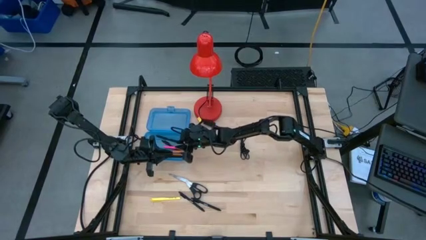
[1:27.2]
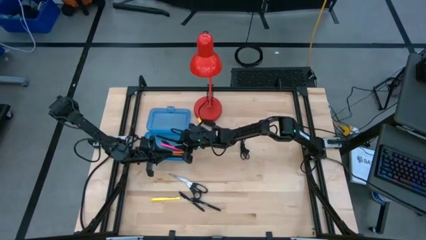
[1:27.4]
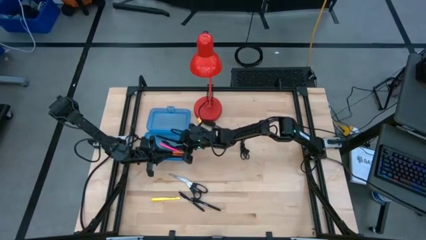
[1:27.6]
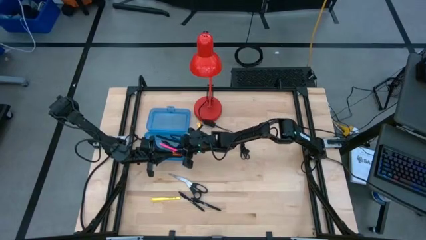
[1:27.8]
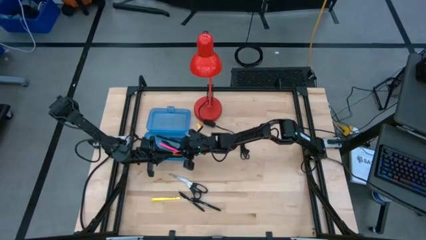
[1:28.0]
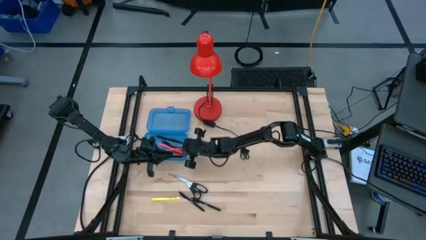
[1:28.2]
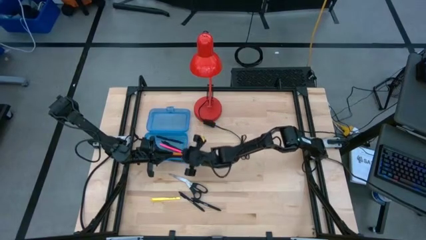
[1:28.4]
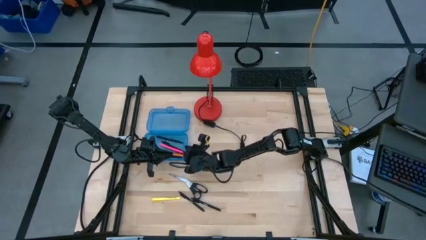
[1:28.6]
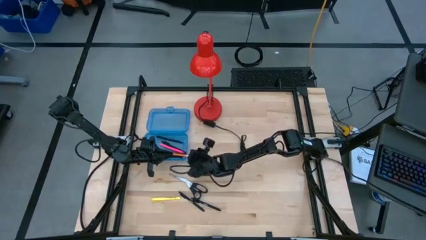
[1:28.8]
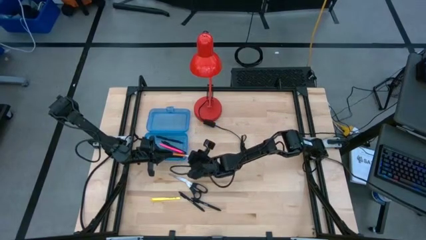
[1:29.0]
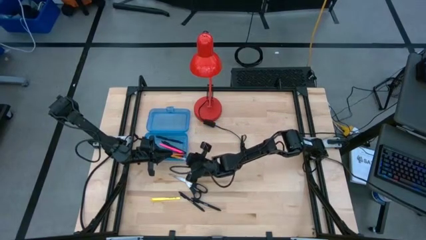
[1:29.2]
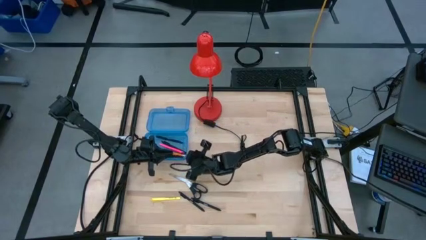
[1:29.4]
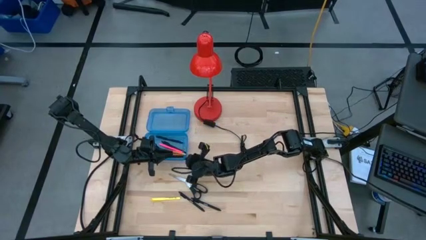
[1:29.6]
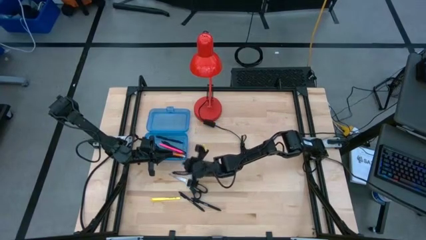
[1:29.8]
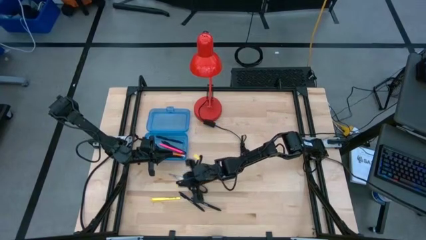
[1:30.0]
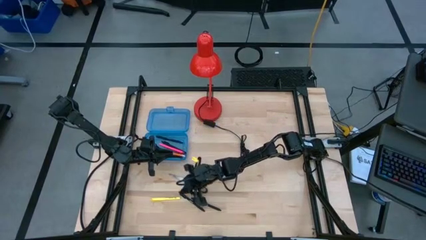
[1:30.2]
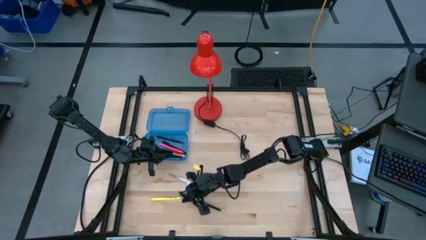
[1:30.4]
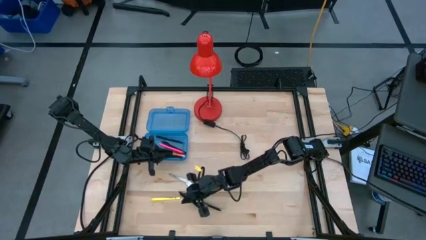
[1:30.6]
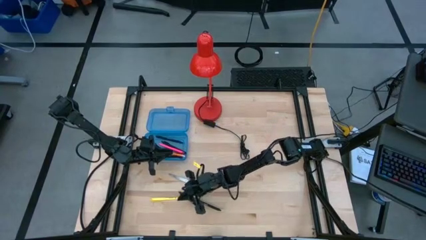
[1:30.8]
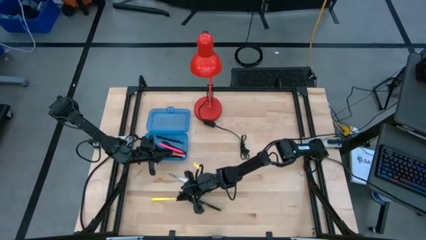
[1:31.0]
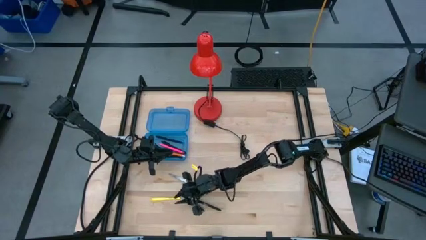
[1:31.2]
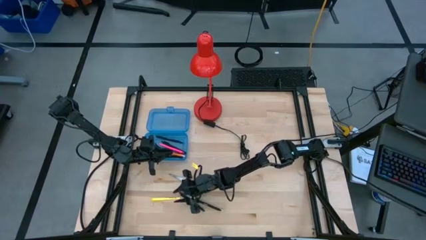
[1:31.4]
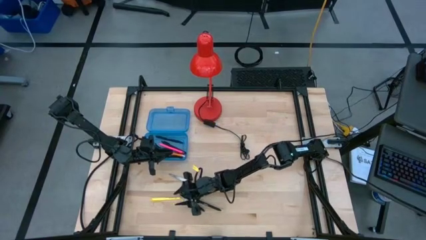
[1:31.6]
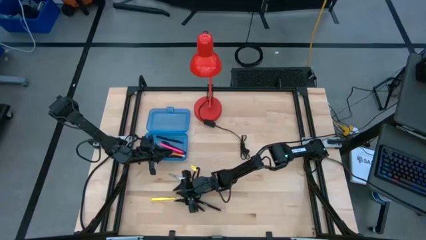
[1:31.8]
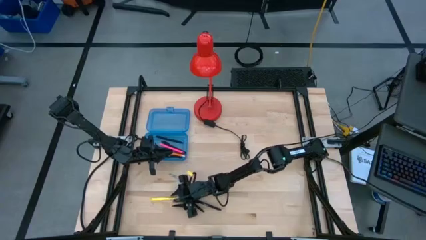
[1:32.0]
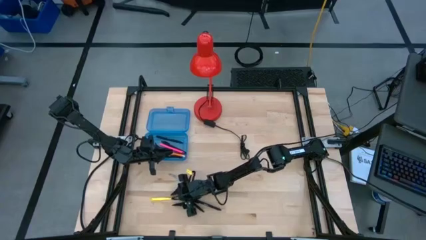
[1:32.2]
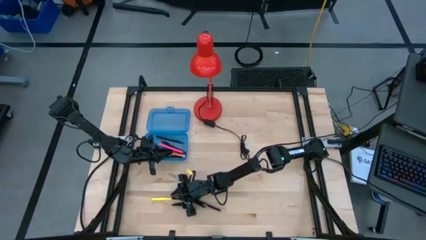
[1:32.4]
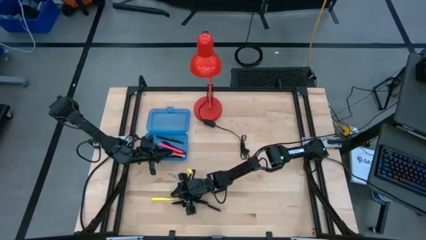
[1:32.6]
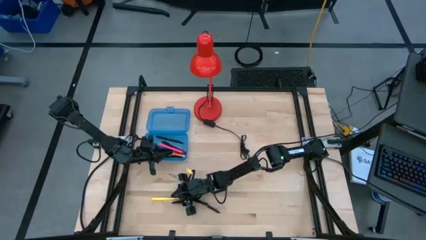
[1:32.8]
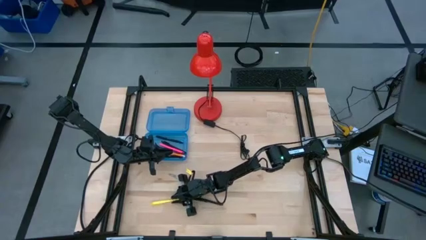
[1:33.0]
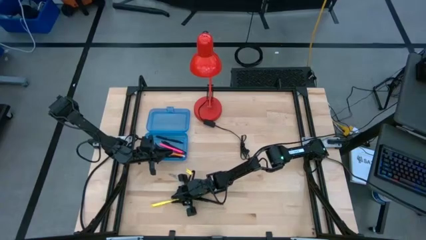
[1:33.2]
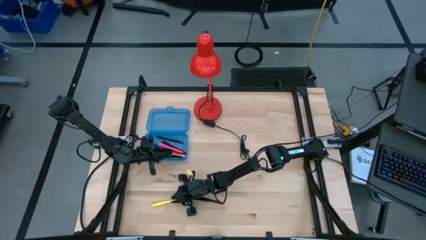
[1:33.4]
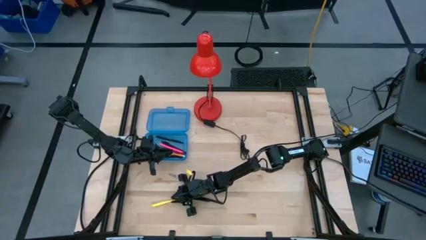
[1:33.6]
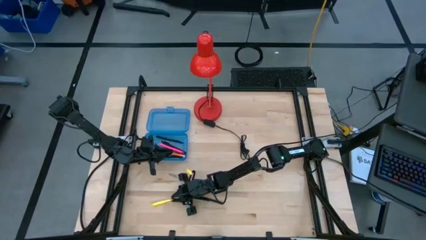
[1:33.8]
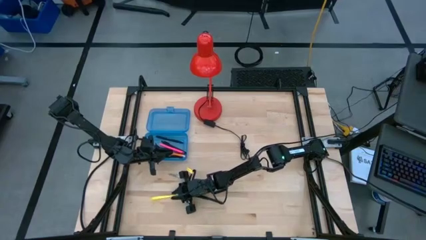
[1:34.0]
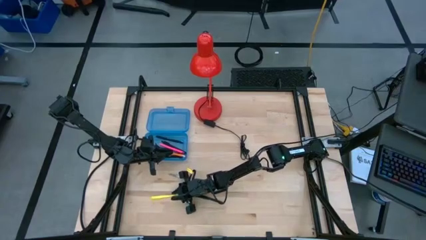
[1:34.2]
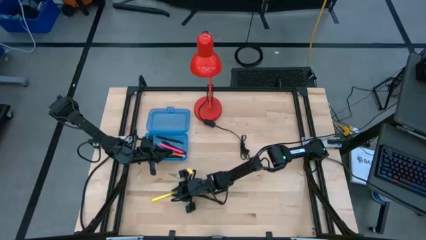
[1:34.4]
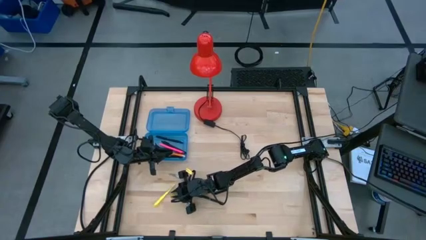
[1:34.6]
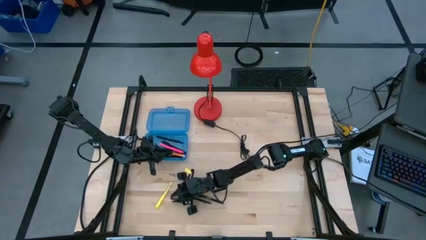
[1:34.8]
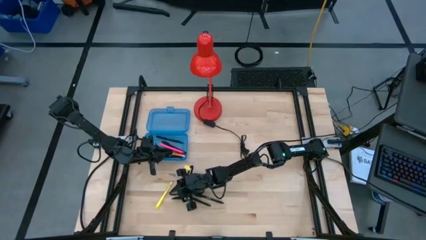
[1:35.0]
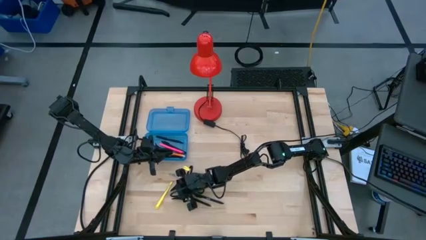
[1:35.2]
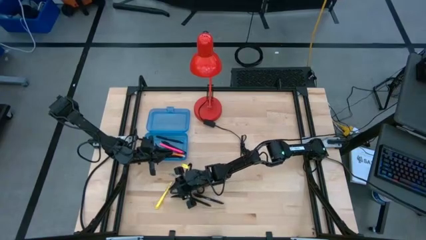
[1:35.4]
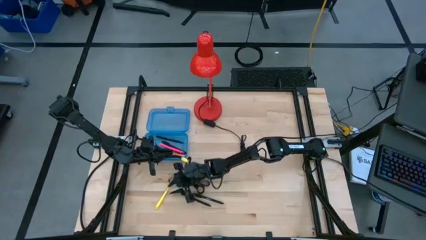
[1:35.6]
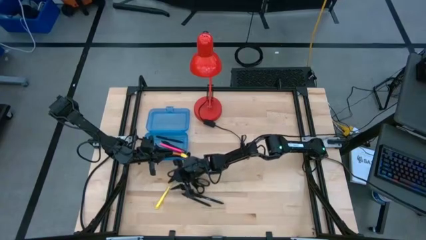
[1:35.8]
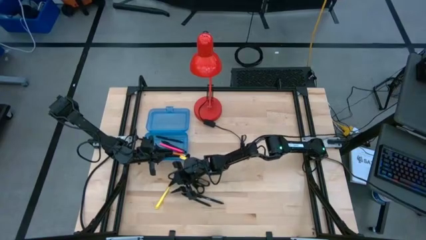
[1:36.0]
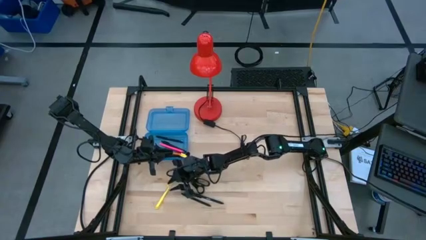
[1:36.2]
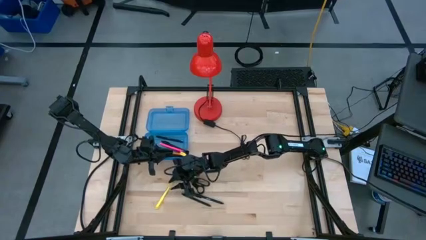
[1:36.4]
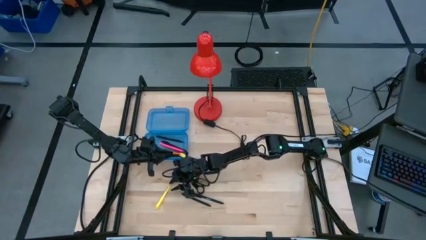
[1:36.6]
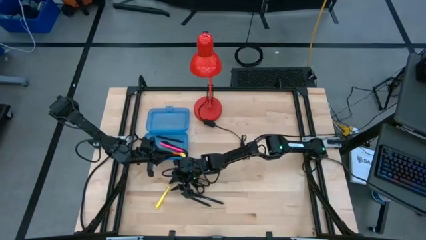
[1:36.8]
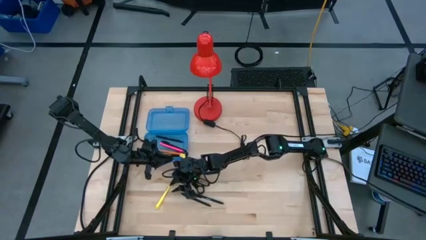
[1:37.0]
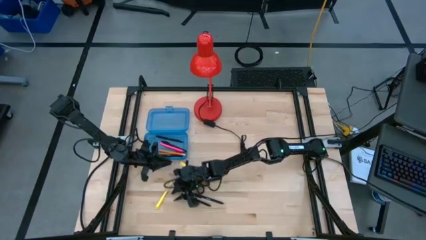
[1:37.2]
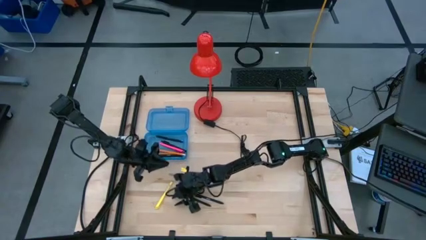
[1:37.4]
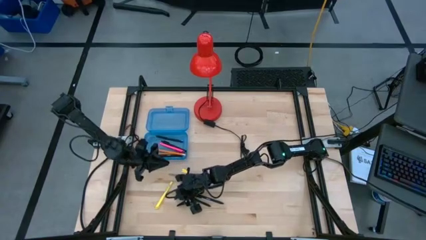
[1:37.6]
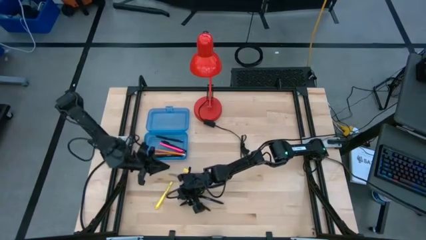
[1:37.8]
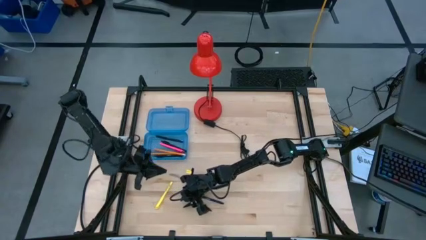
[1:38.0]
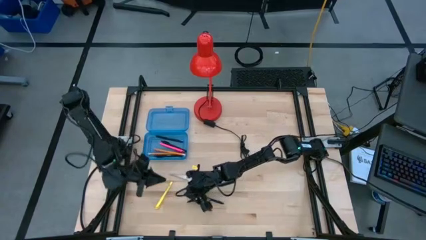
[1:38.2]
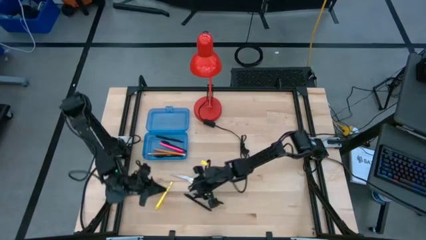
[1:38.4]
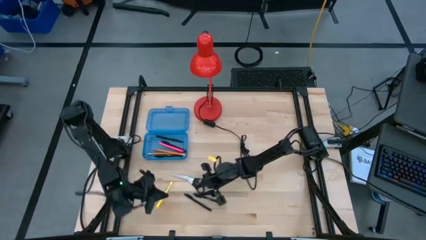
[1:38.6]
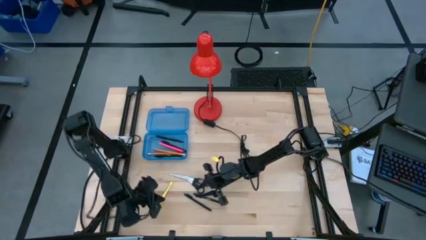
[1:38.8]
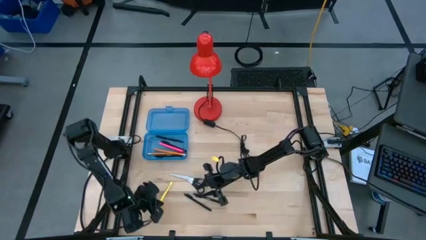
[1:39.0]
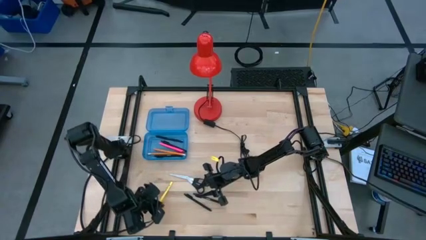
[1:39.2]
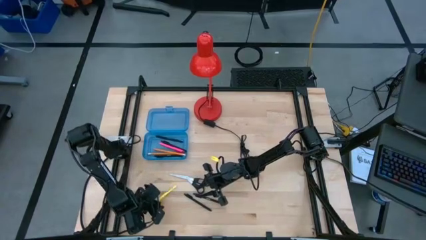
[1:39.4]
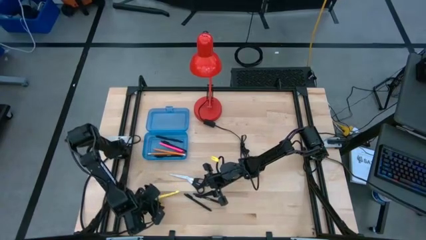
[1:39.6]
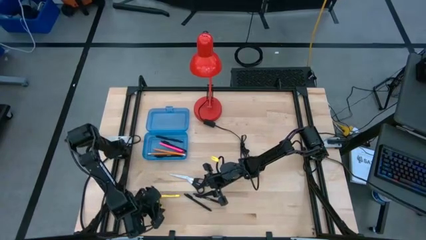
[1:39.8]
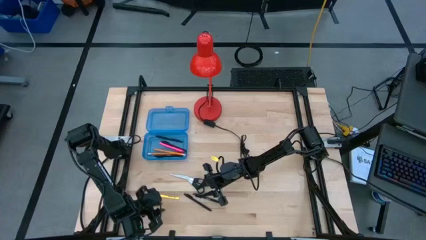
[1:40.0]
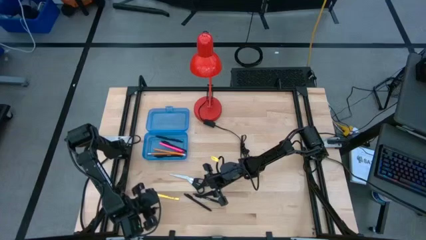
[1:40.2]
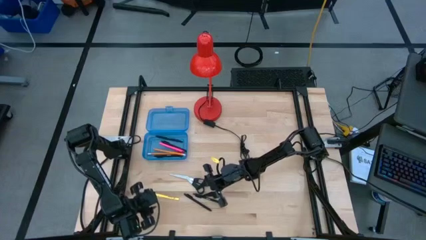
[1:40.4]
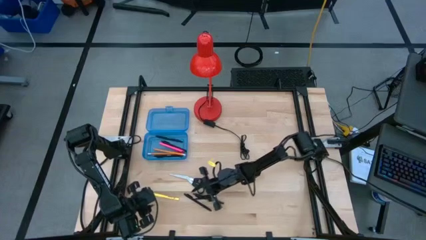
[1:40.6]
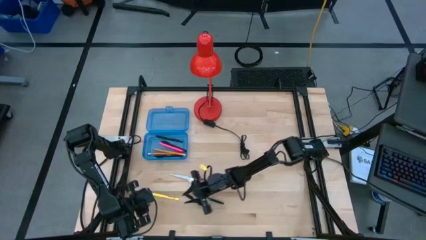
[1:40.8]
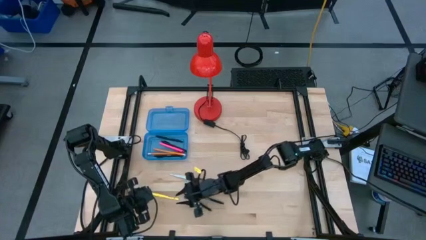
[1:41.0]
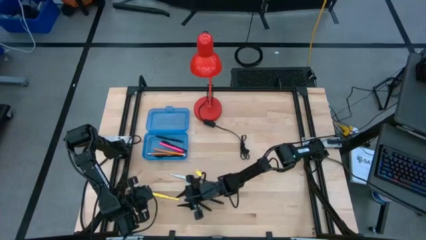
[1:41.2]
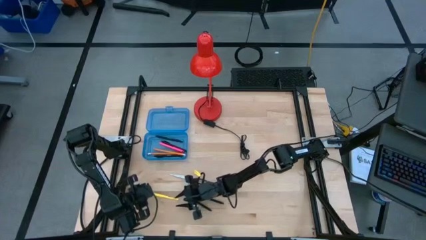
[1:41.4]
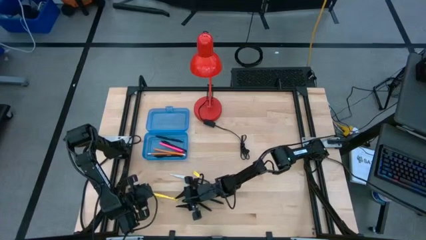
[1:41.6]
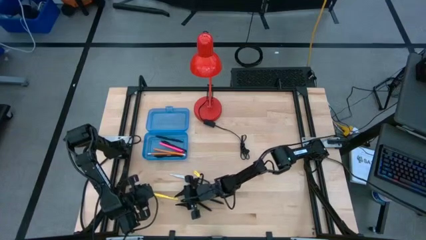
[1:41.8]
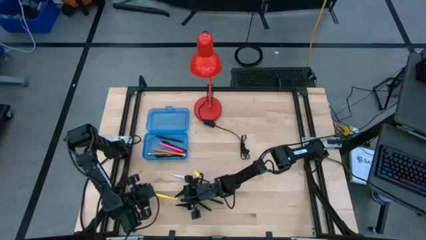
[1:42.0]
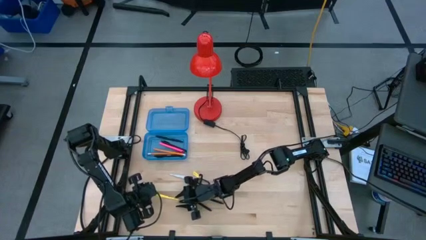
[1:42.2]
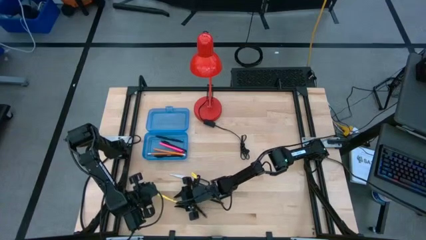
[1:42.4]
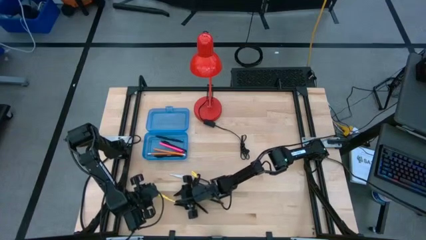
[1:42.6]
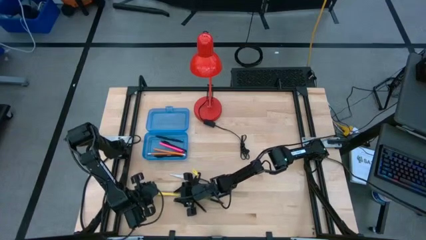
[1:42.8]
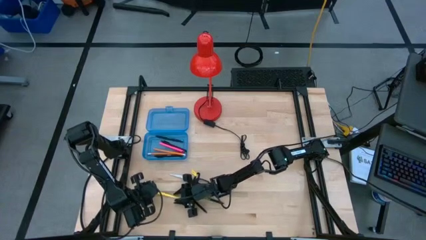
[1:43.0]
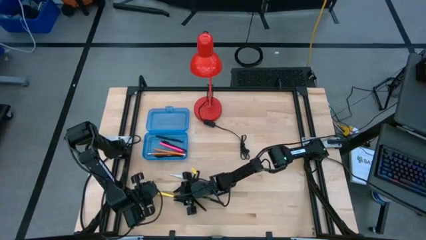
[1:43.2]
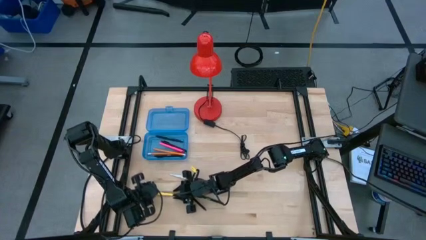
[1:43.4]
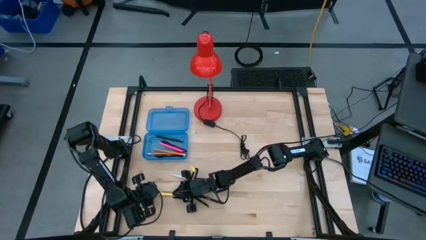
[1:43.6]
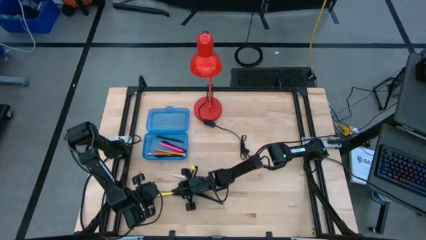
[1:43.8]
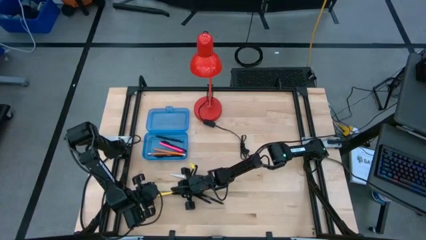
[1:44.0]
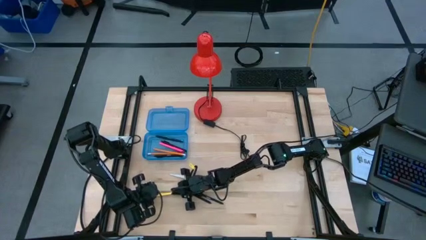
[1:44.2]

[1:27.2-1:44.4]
Task: Pick & place school supplies into a supply box
Put the yellow pen into the blue supply box
